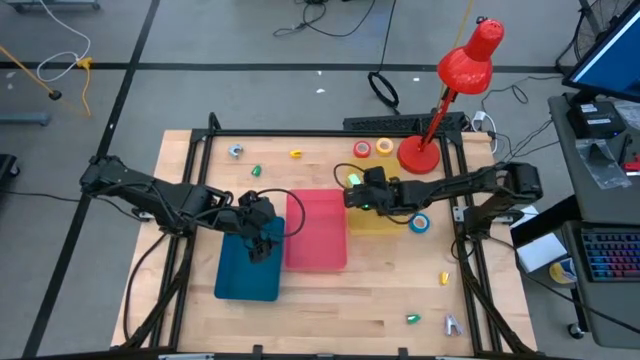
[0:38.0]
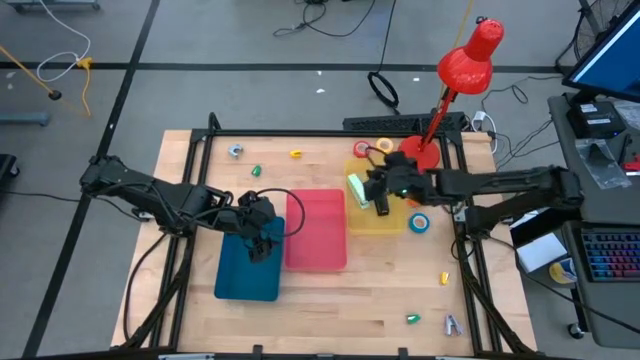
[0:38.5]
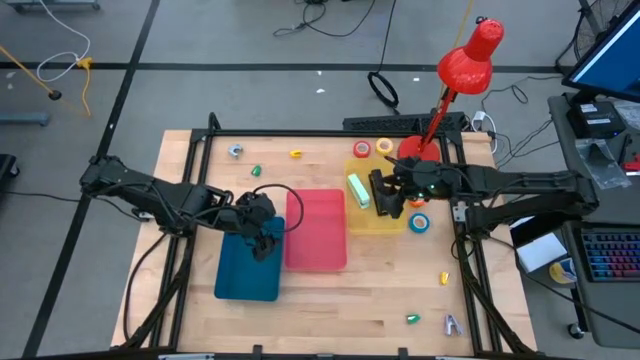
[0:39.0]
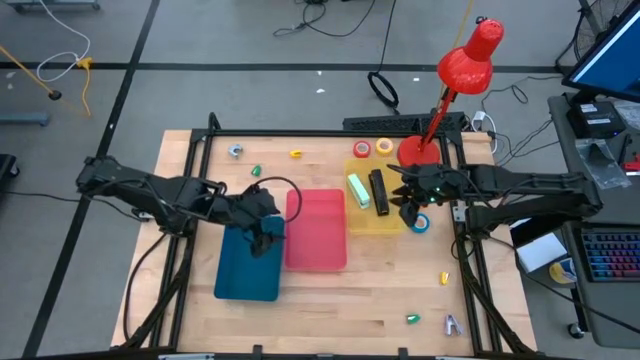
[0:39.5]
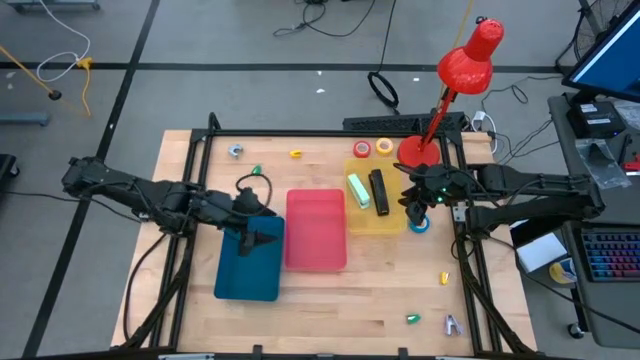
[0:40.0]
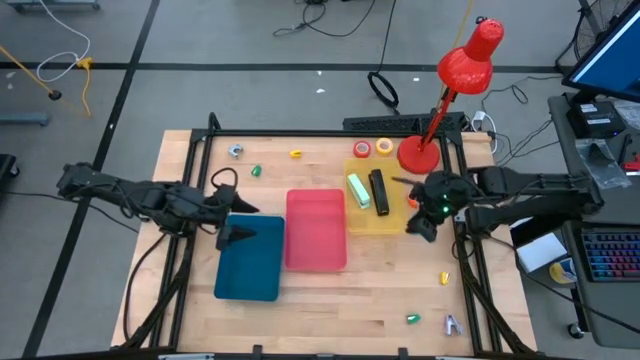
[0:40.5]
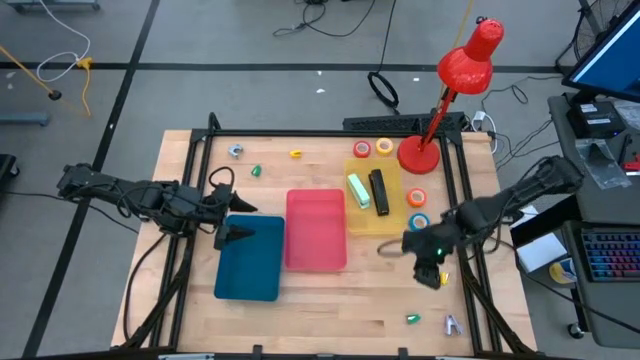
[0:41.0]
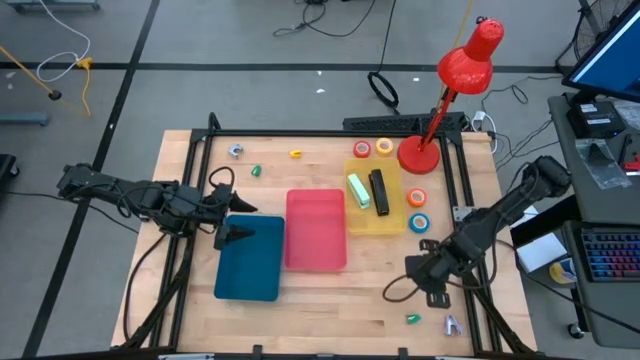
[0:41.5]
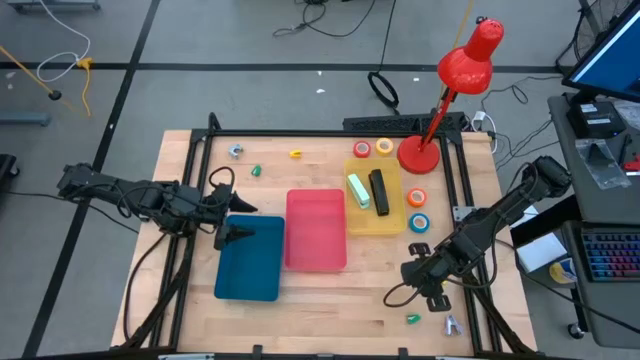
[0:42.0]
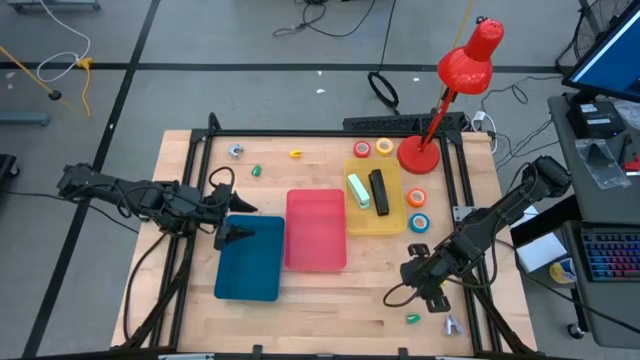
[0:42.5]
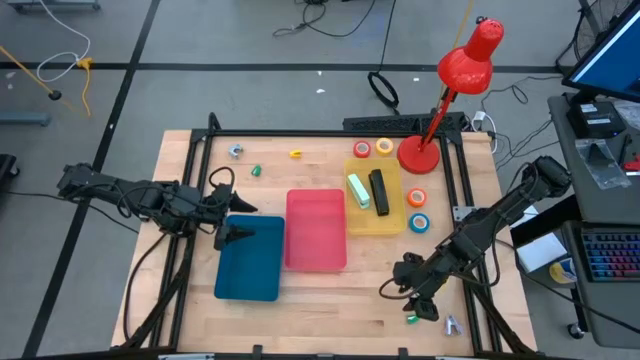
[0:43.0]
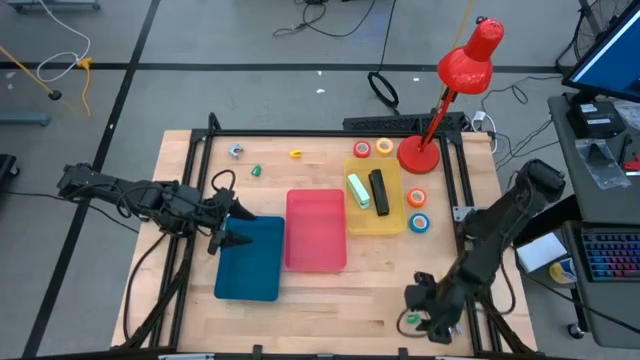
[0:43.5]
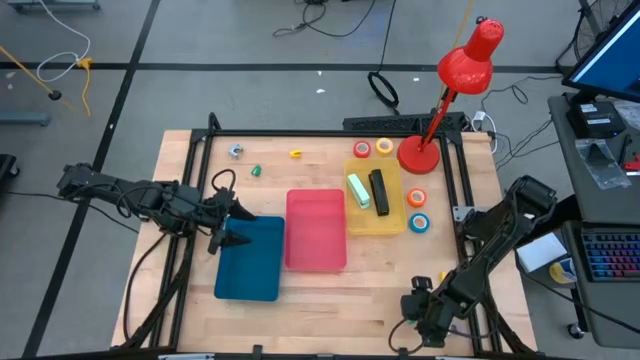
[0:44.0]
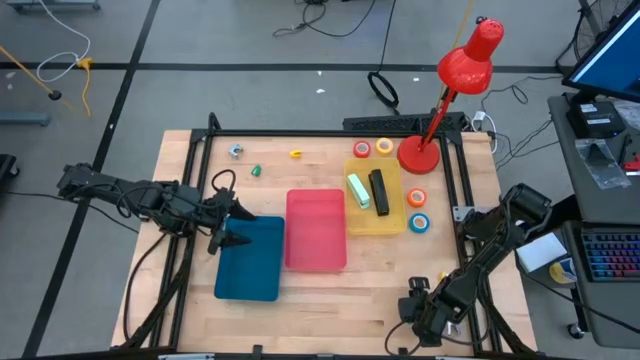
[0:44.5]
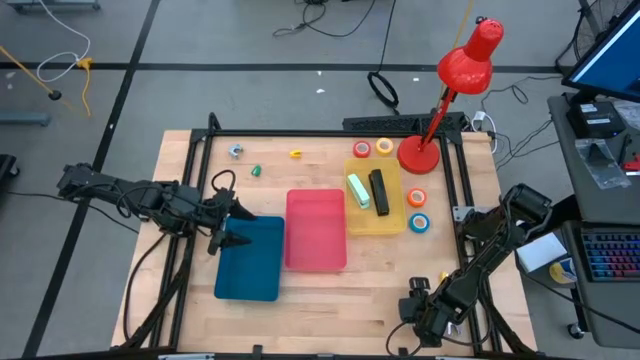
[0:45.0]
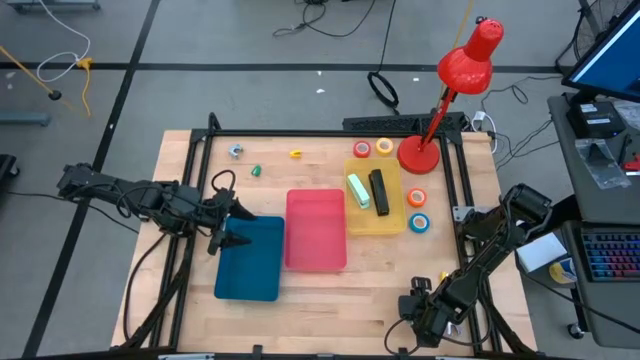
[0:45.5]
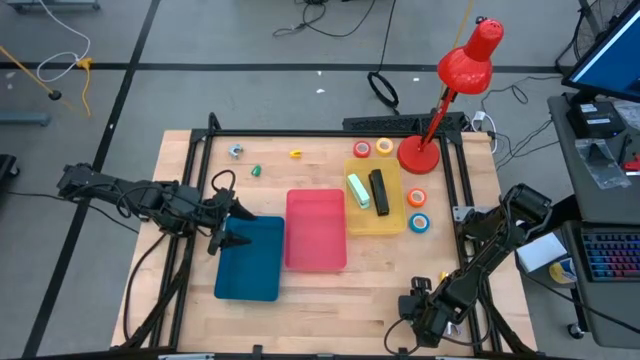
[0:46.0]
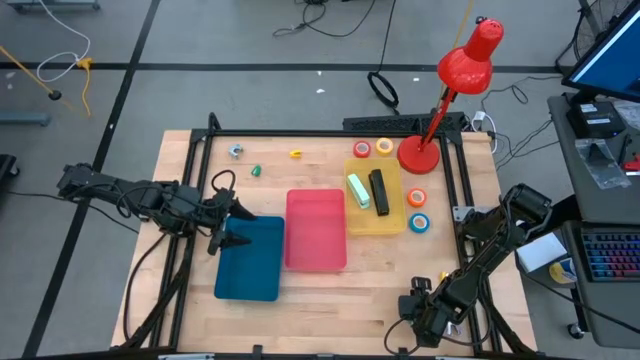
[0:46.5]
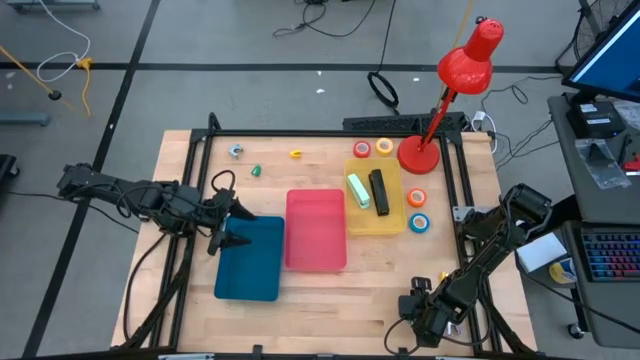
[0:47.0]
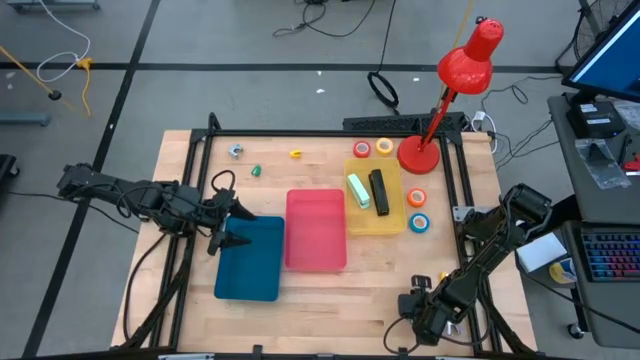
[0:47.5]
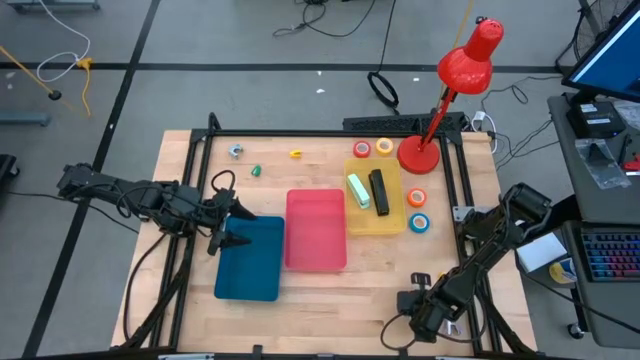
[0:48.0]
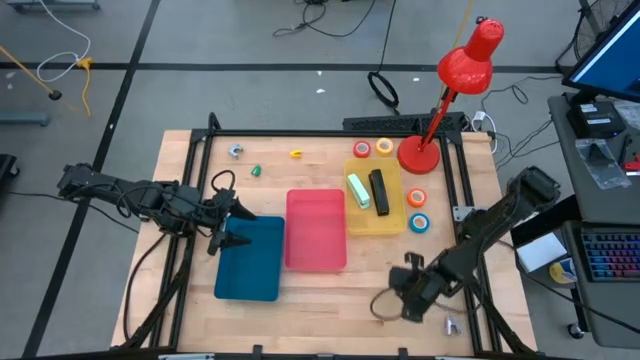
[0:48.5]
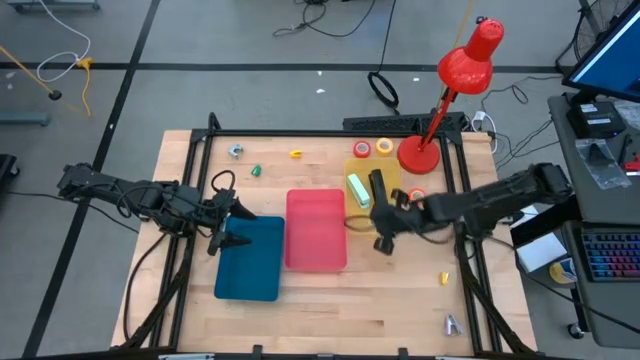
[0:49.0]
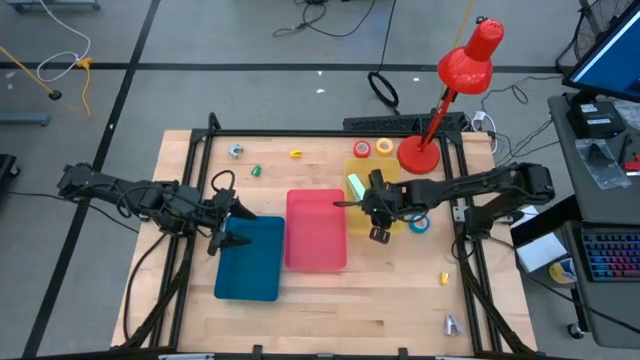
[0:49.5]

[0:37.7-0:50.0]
Task: Pick and place Stapler, Stapler remover, tape
Put the bottom green stapler into the yellow bin

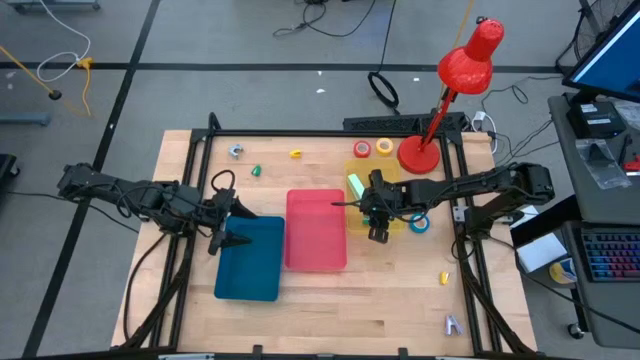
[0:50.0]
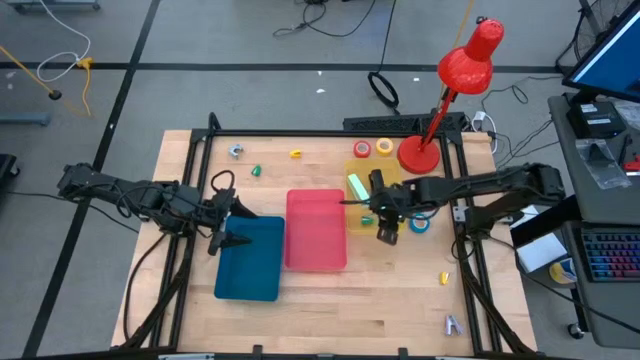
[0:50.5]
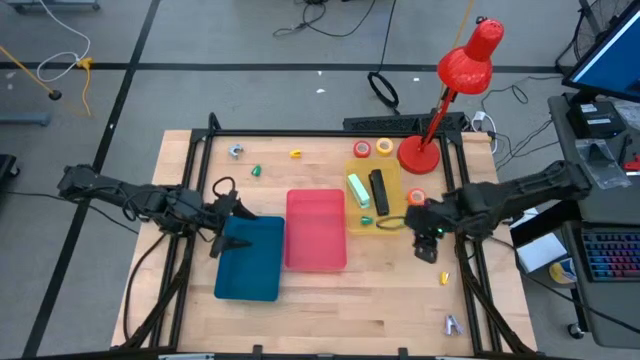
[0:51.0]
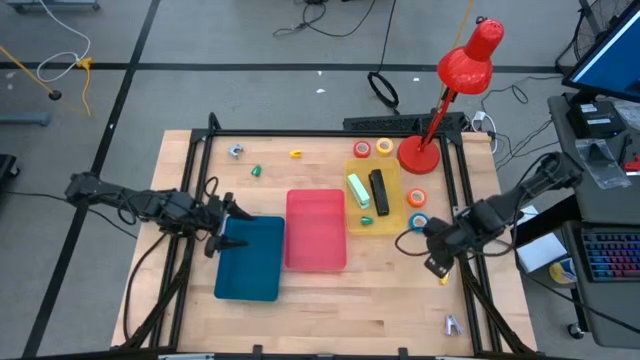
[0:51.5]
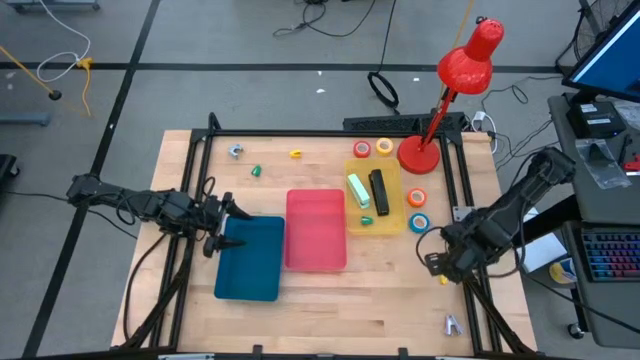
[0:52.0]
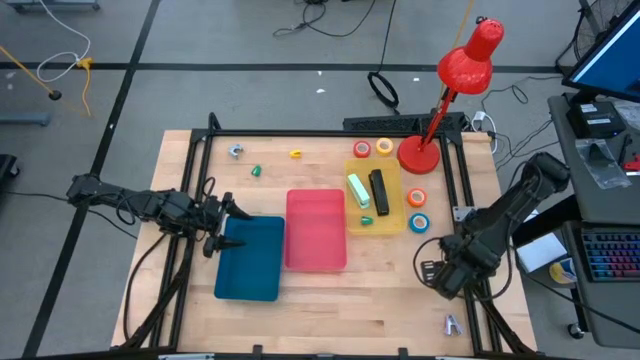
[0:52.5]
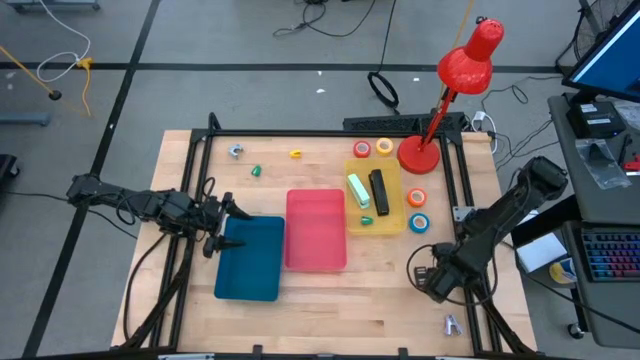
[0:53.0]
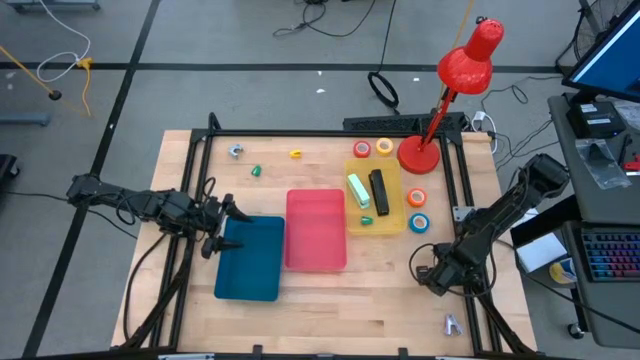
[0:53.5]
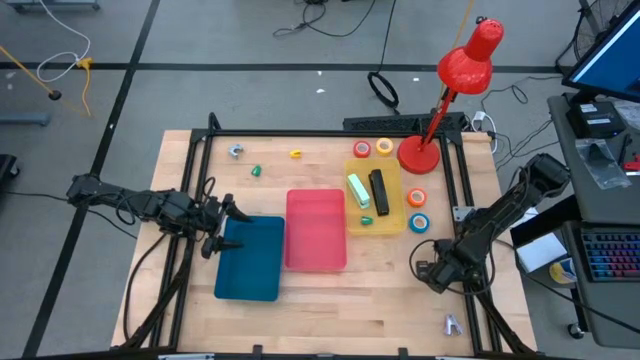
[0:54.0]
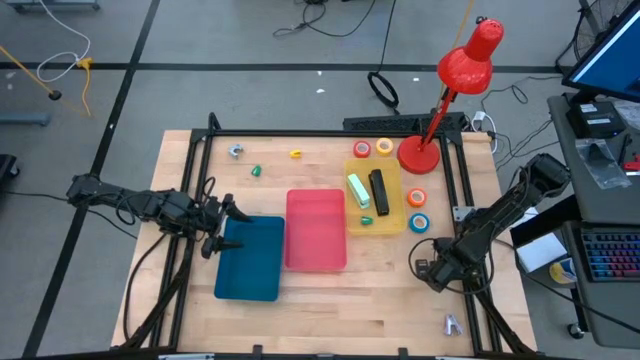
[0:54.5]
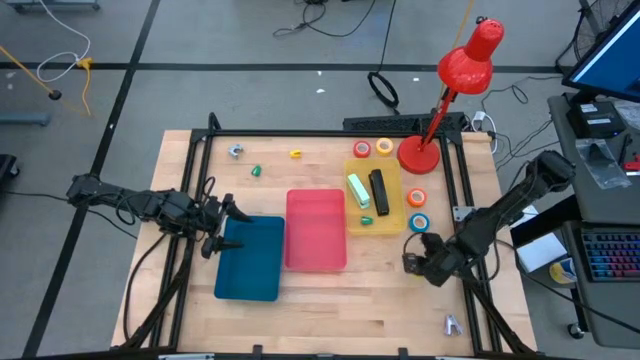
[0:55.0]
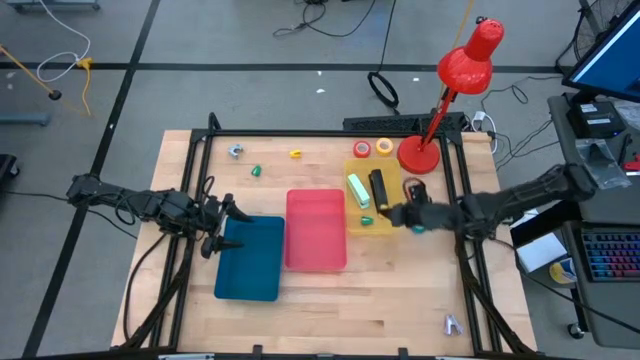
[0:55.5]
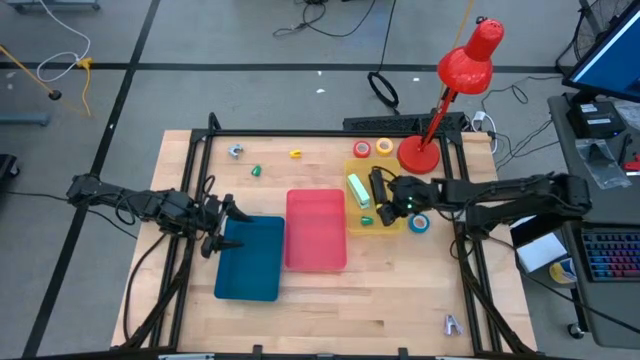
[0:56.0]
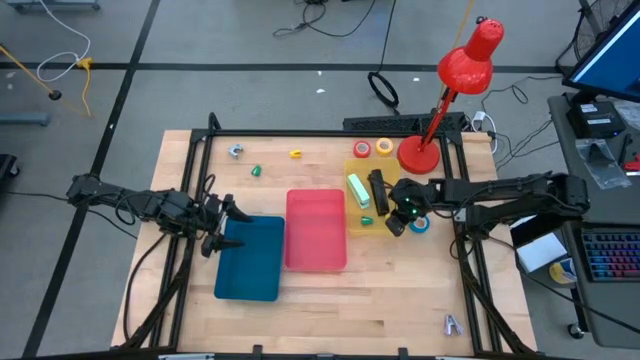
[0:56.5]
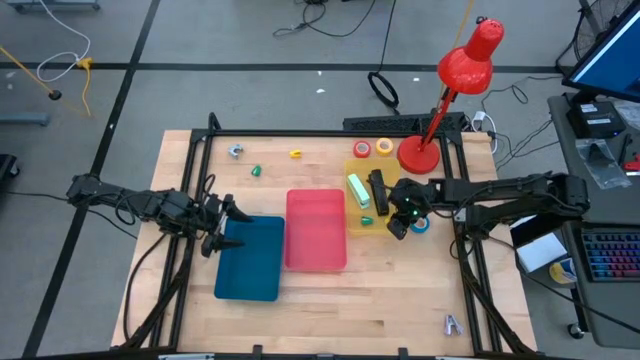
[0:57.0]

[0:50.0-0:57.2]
Put the bottom yellow stapler into the yellow bin
